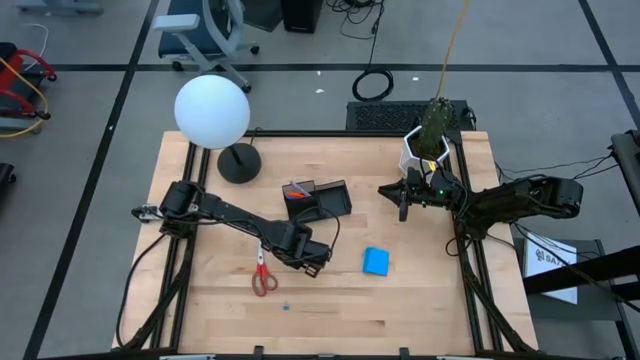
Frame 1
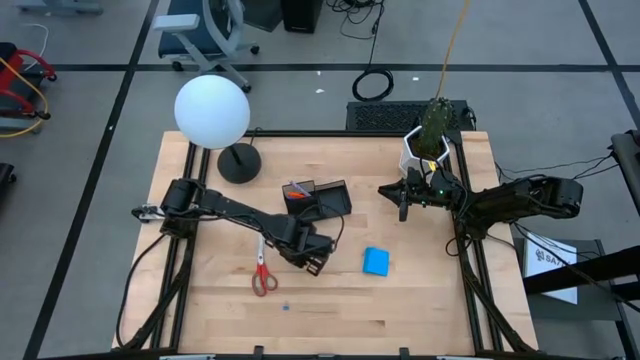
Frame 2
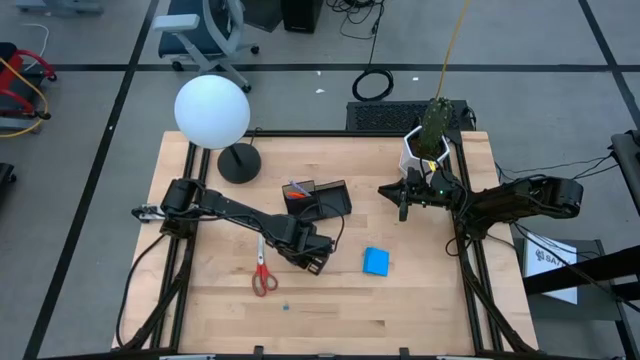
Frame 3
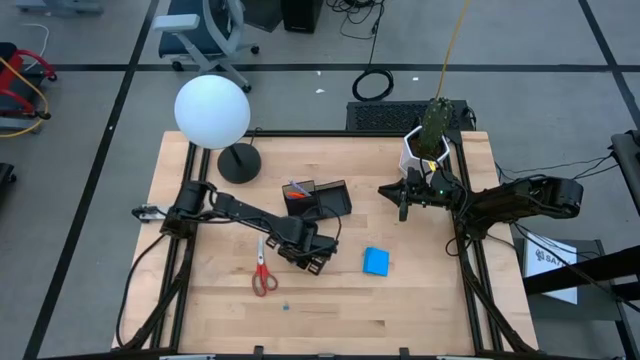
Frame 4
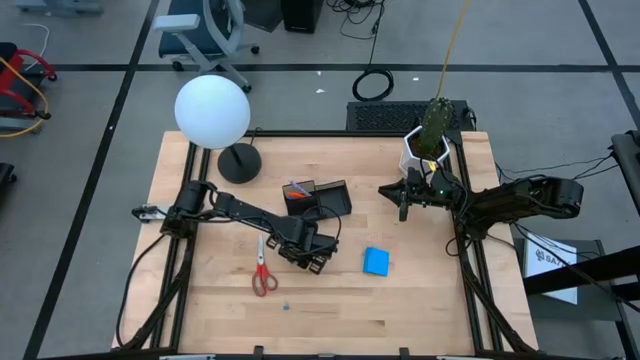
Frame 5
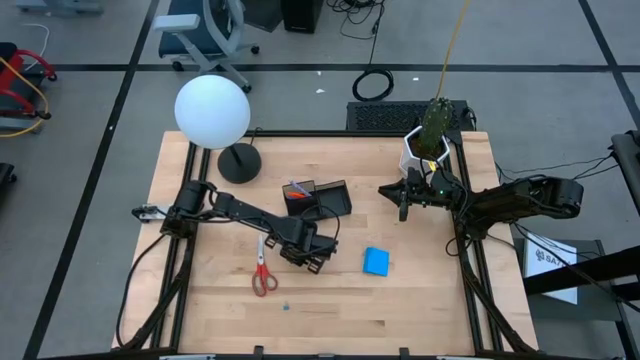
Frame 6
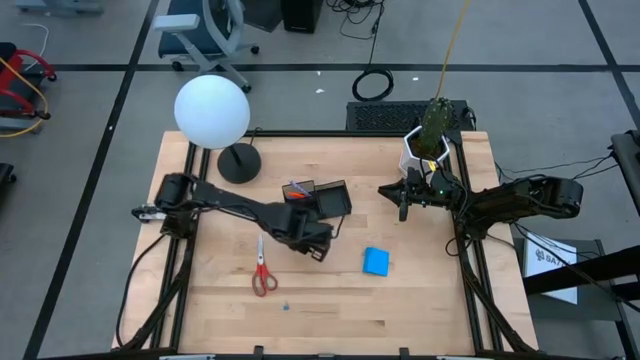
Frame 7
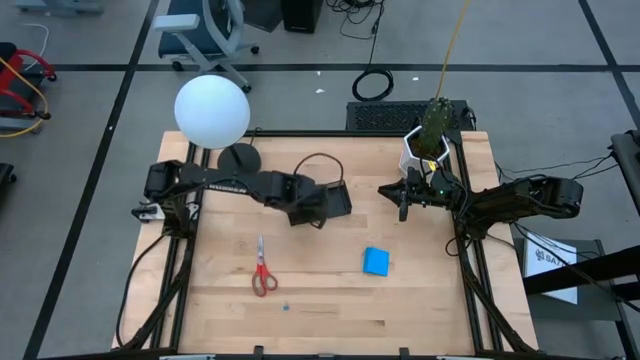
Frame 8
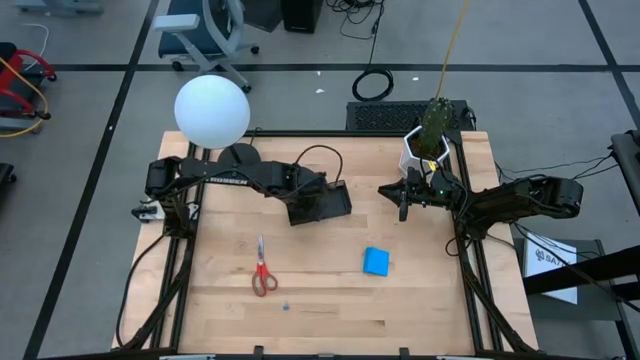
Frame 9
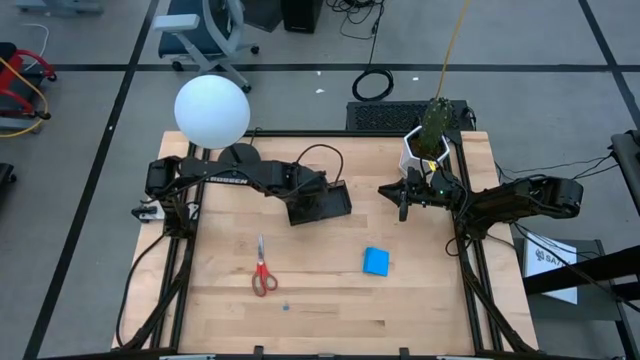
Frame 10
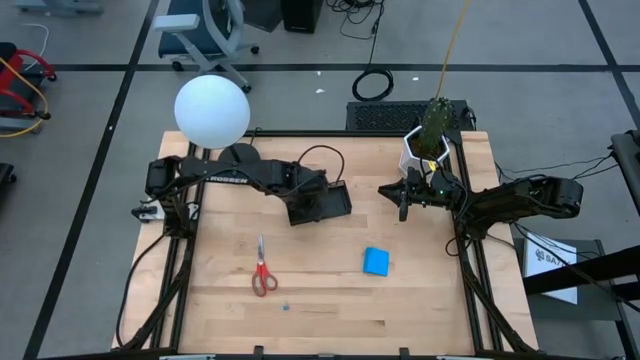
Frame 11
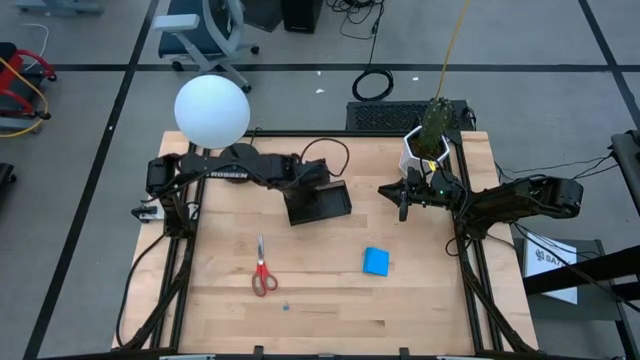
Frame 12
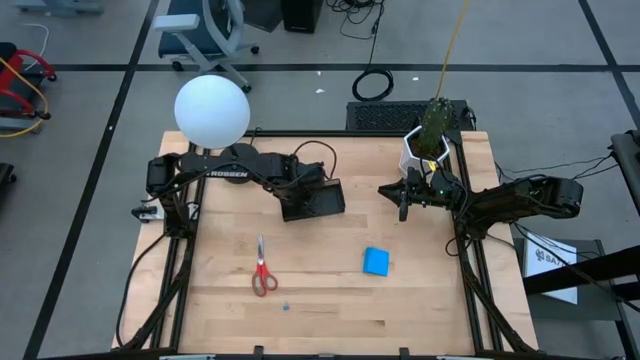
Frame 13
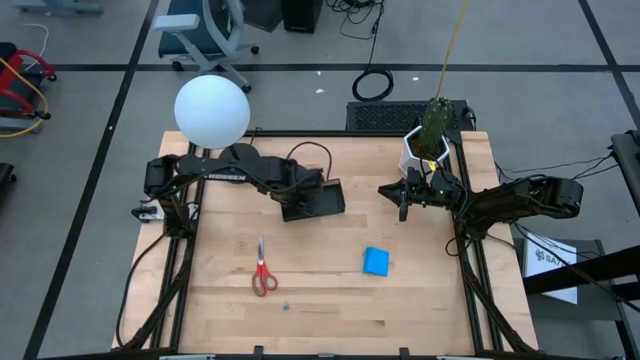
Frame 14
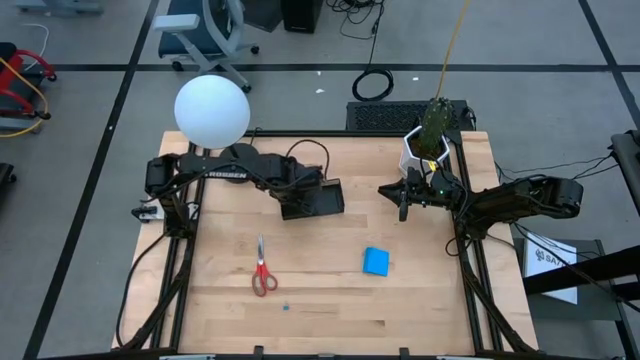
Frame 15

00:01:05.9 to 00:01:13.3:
Task: Pick and place office supplies into organizer
Put the blue eraser into the black desk organizer

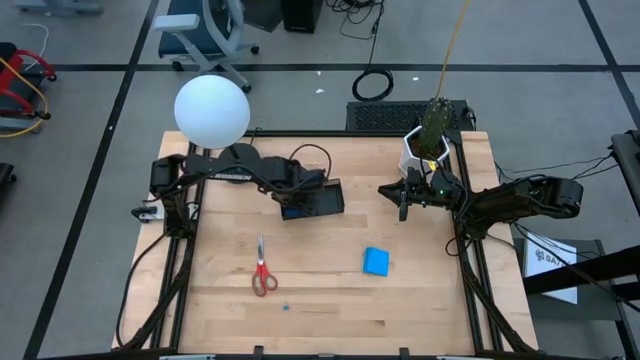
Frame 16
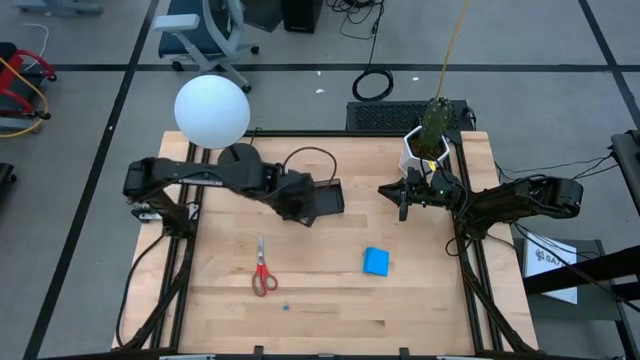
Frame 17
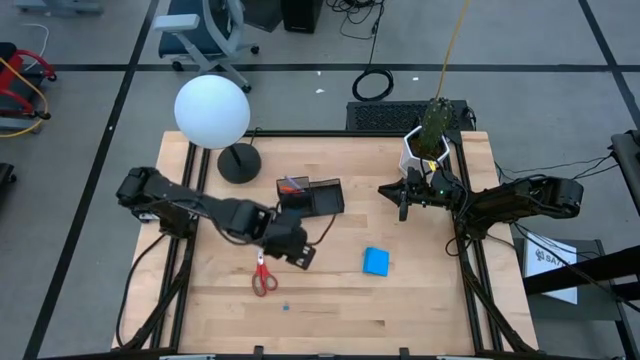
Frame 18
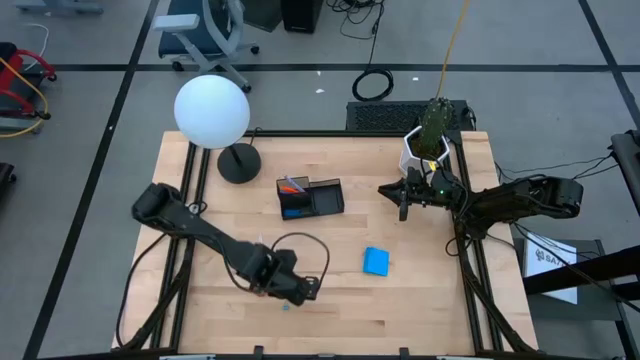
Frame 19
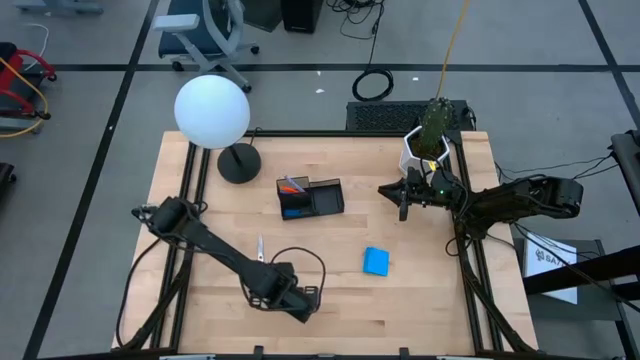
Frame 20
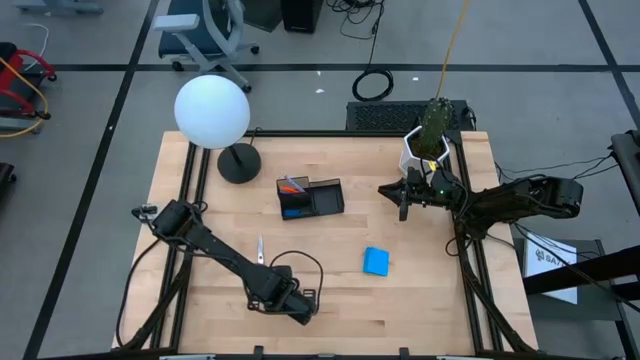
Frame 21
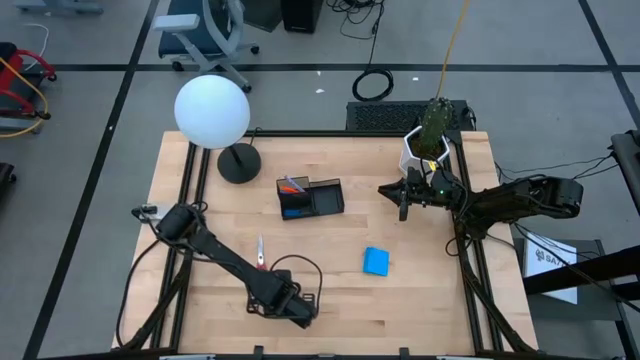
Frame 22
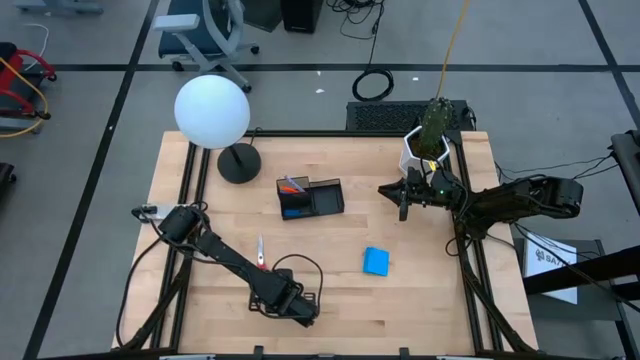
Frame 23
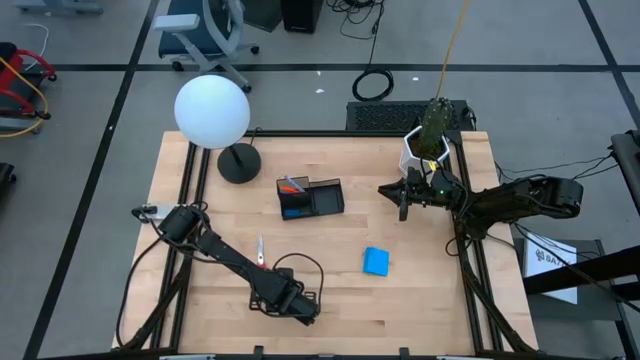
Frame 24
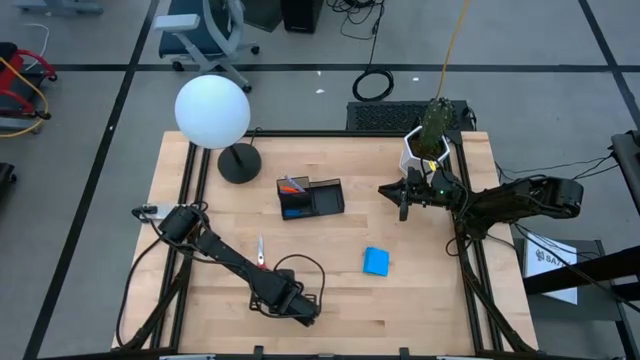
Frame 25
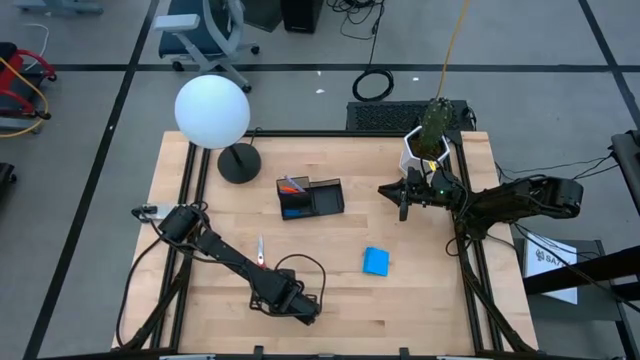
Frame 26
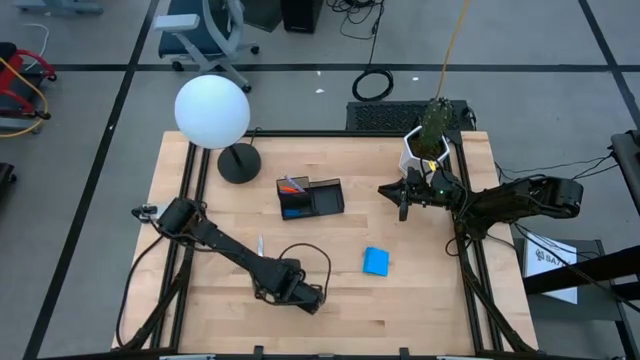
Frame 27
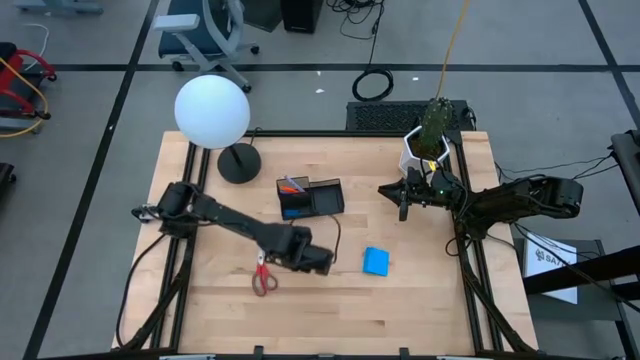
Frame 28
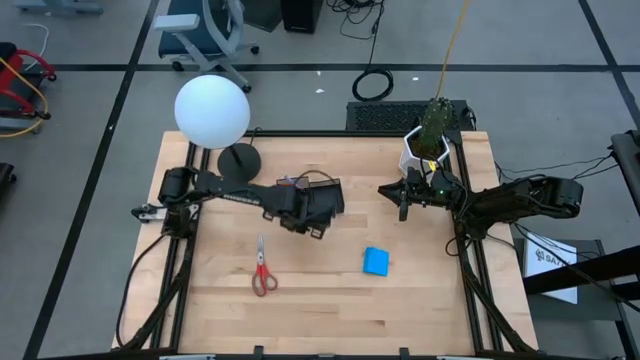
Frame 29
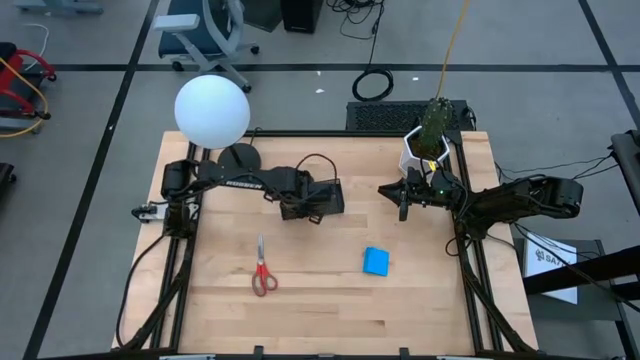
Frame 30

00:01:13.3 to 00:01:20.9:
Put the blue binder clip into the black desk organizer

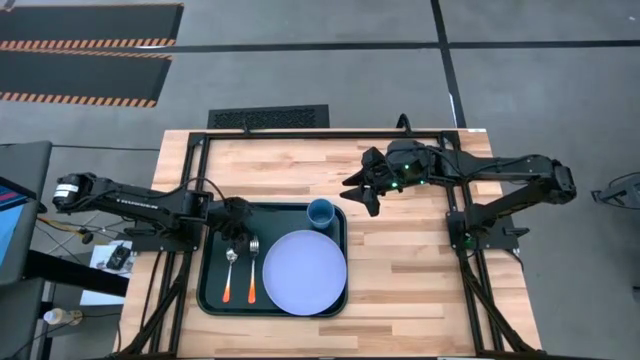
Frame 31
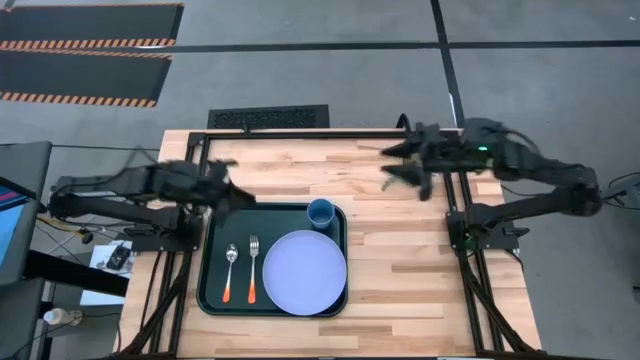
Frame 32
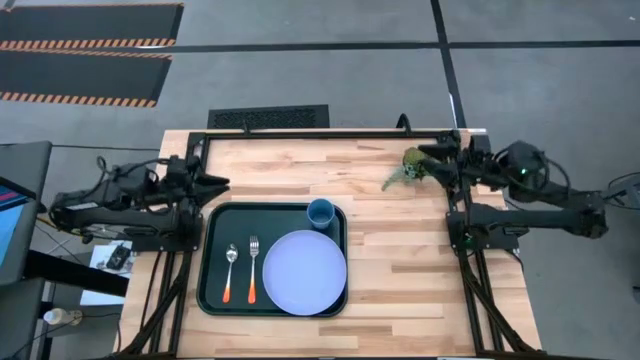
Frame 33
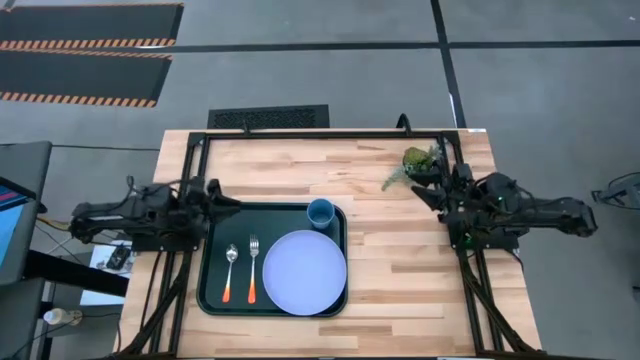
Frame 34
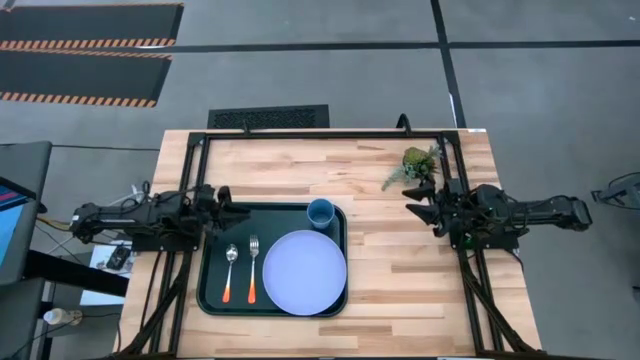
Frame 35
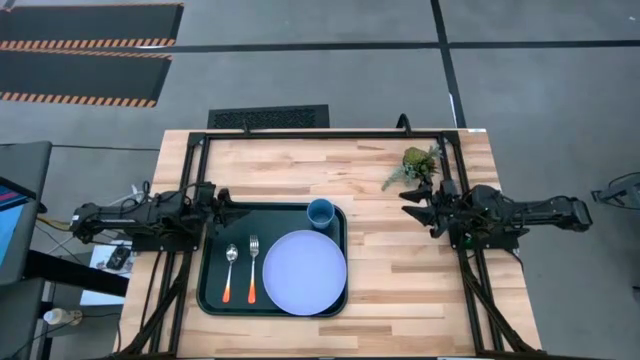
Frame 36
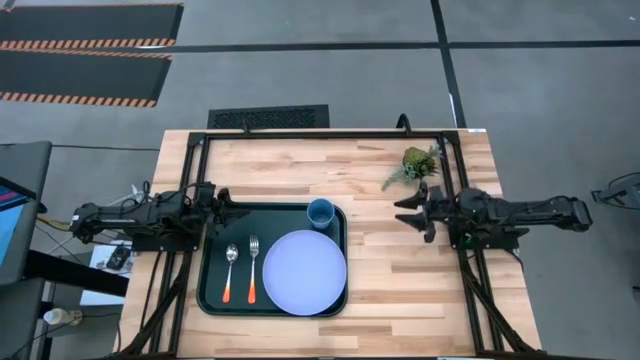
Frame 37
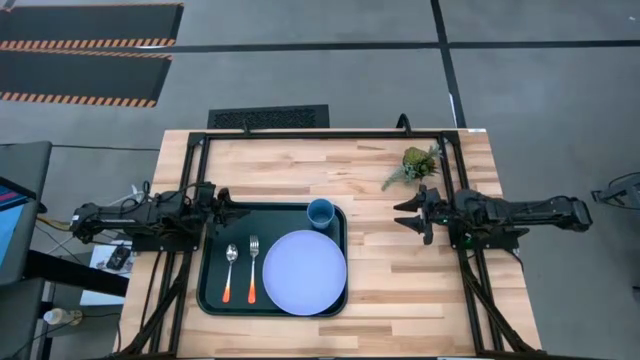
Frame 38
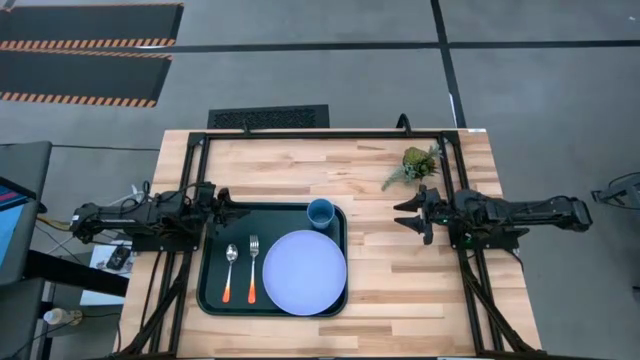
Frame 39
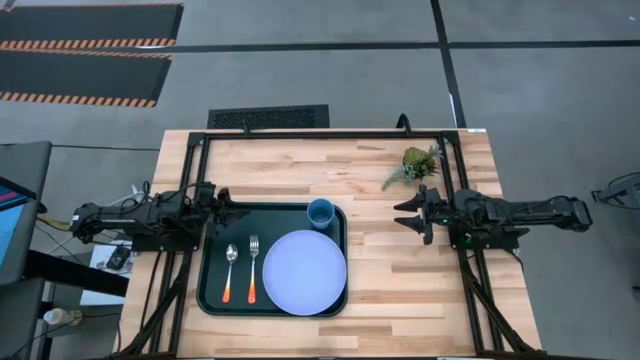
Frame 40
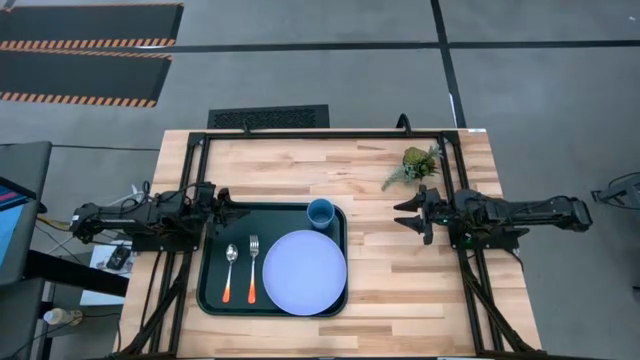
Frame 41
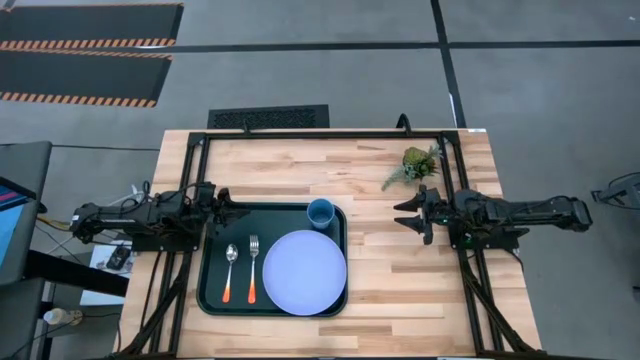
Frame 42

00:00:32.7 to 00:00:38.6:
Task: Pick and place plate/cup/fork/spoon on tray
Return to Home Position

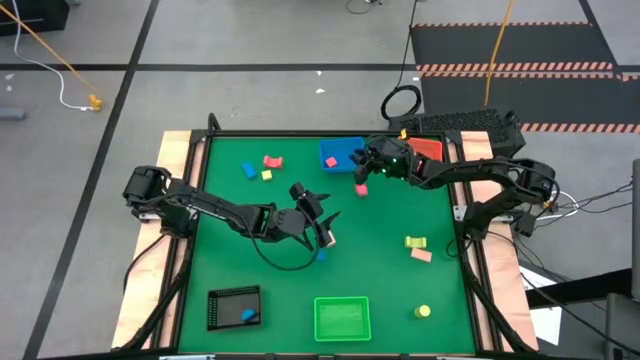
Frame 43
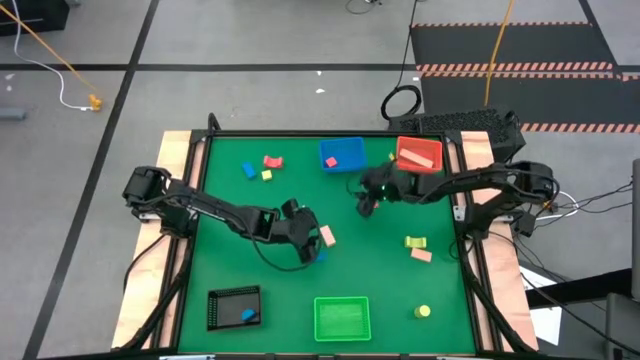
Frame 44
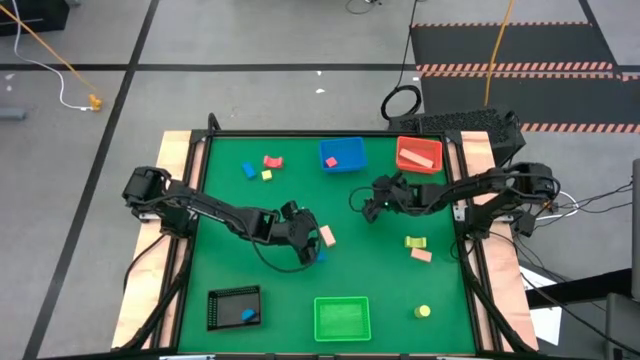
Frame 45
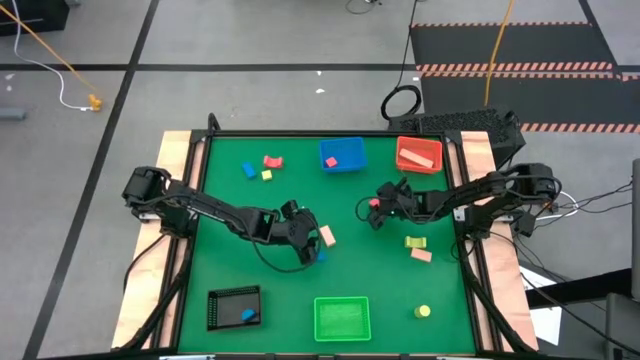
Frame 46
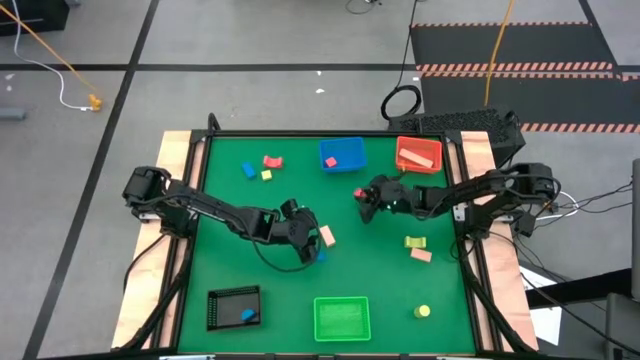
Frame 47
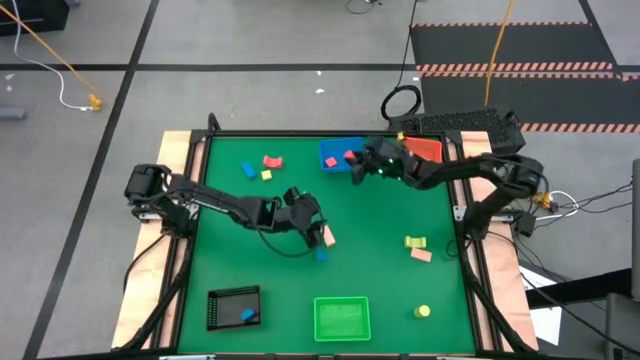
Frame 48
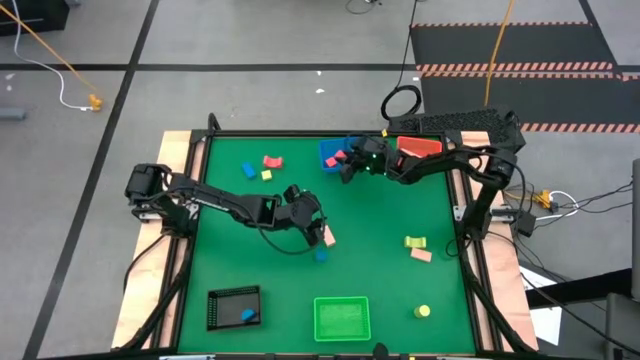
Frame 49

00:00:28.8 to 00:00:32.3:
Task: Sort & place blocks by color
Put the pink block into the blue bin
